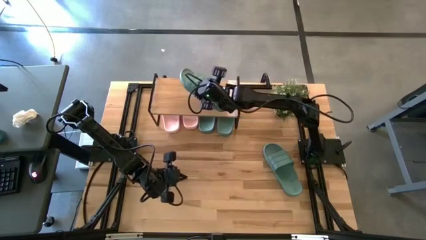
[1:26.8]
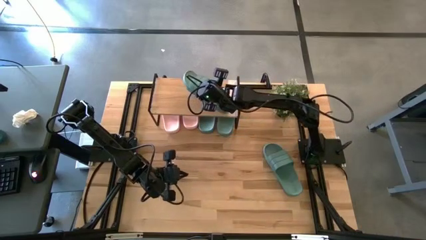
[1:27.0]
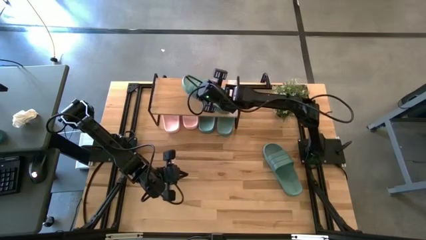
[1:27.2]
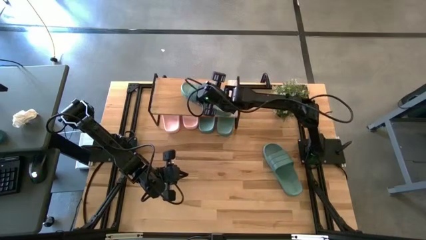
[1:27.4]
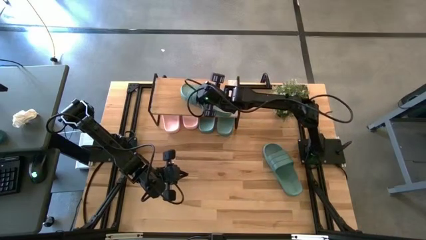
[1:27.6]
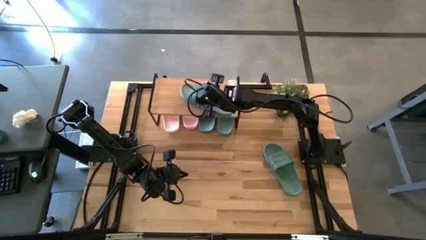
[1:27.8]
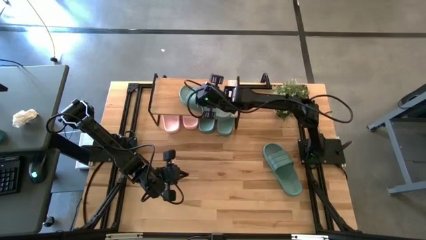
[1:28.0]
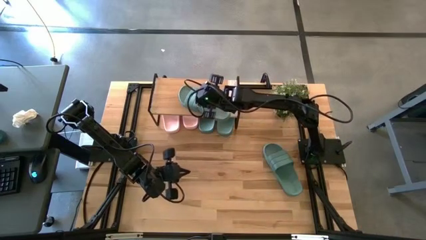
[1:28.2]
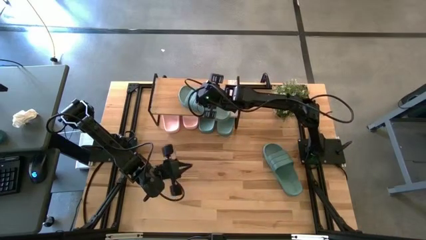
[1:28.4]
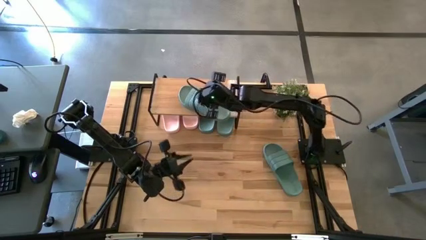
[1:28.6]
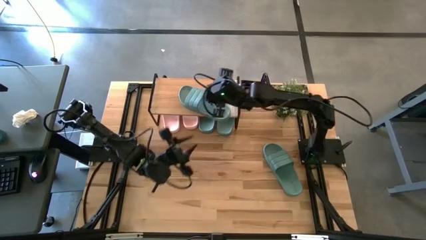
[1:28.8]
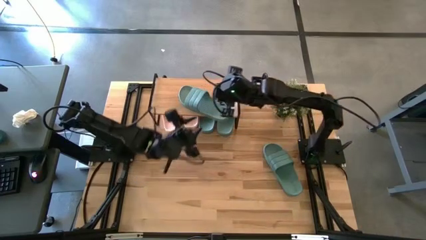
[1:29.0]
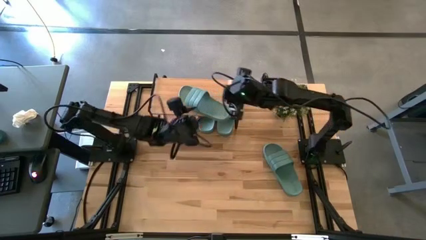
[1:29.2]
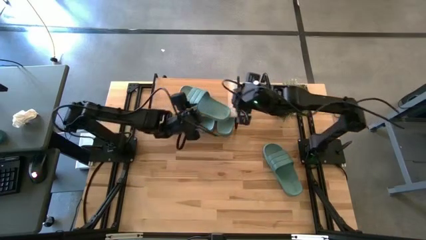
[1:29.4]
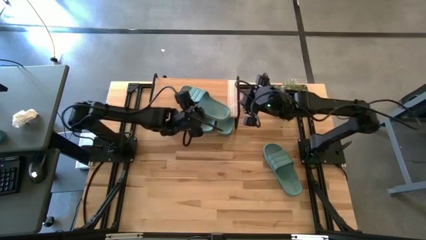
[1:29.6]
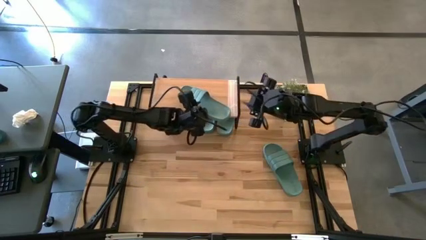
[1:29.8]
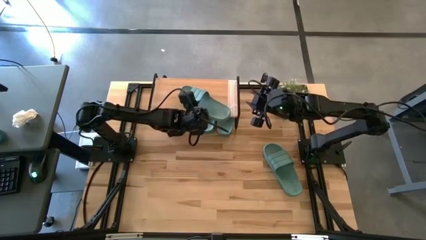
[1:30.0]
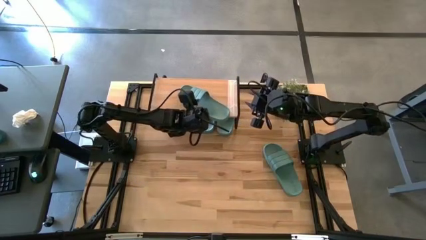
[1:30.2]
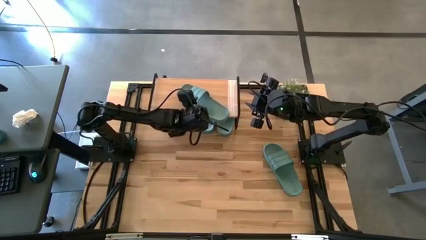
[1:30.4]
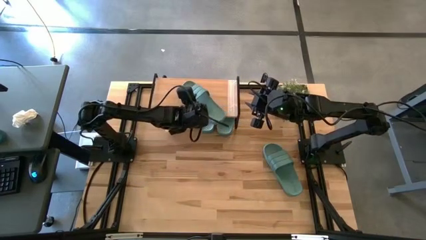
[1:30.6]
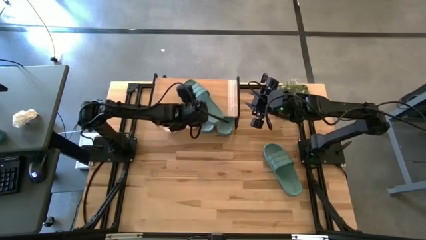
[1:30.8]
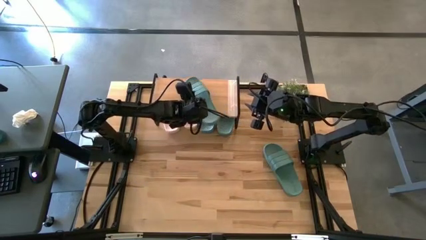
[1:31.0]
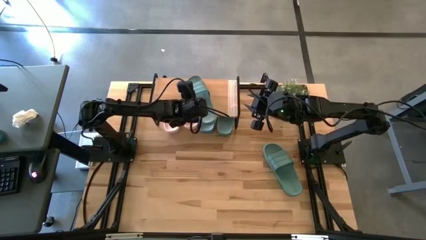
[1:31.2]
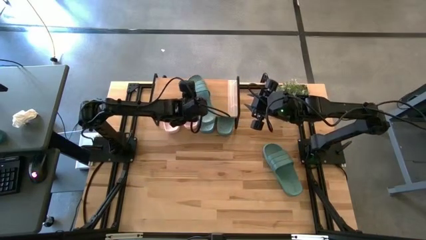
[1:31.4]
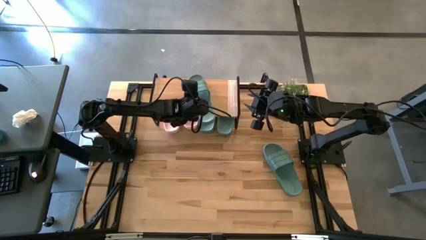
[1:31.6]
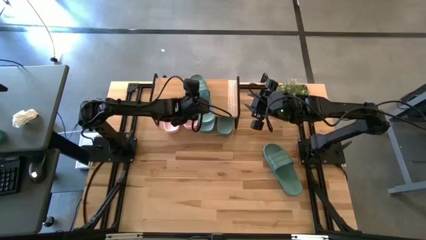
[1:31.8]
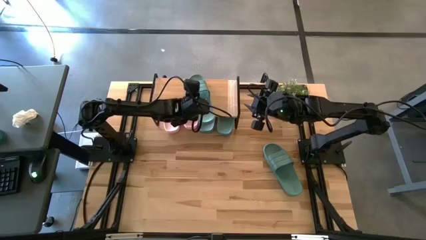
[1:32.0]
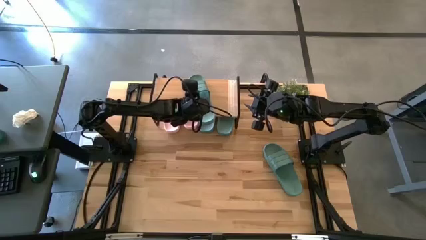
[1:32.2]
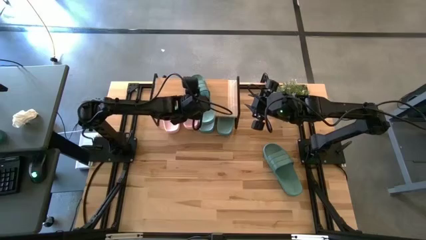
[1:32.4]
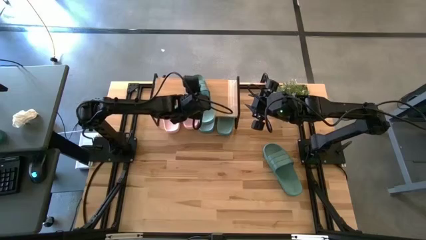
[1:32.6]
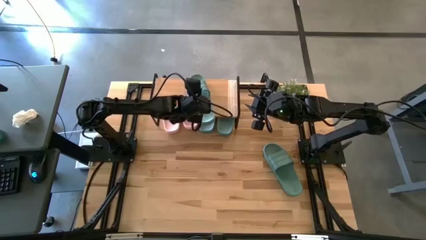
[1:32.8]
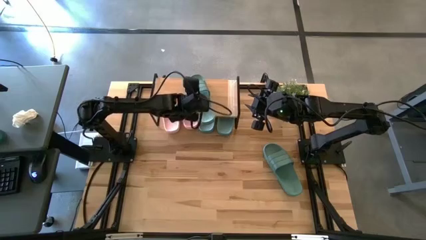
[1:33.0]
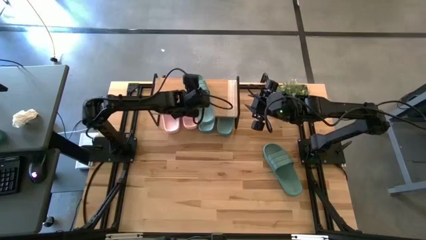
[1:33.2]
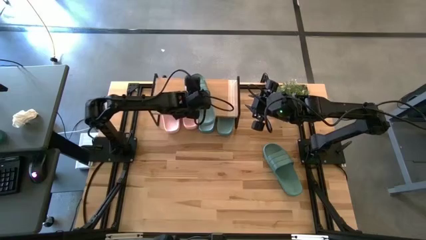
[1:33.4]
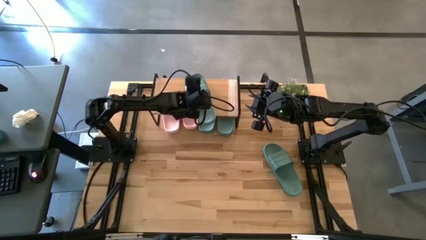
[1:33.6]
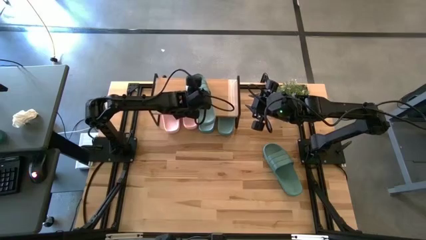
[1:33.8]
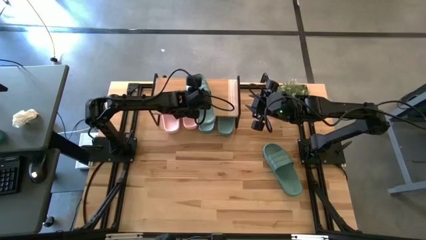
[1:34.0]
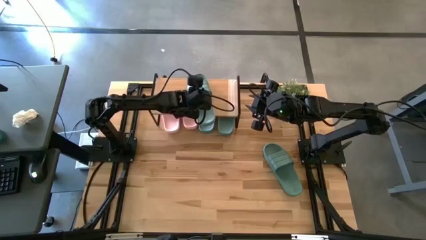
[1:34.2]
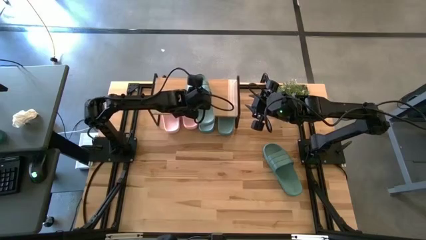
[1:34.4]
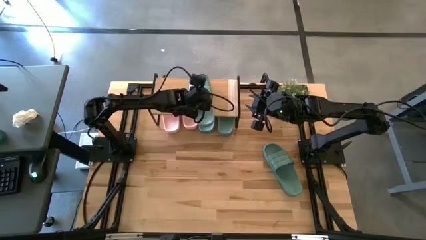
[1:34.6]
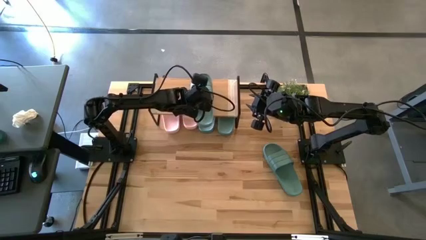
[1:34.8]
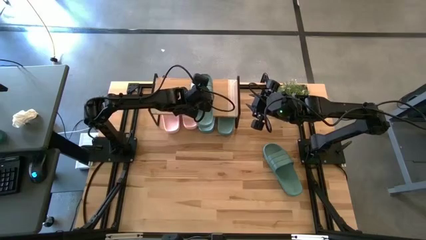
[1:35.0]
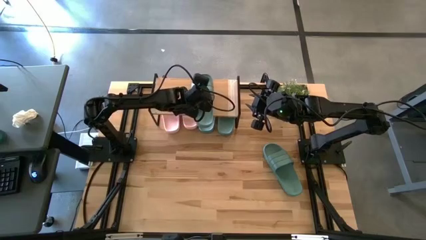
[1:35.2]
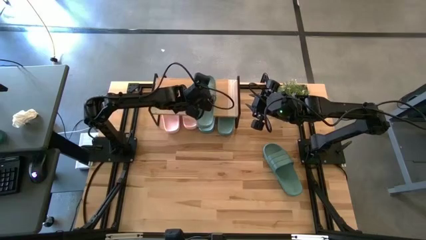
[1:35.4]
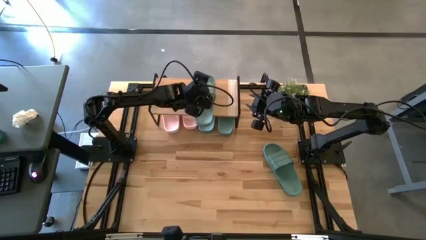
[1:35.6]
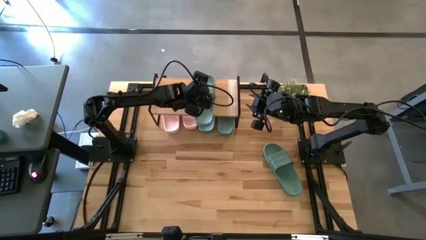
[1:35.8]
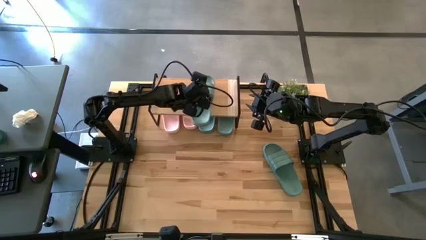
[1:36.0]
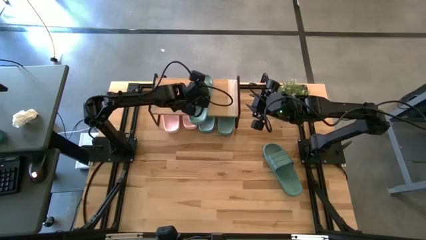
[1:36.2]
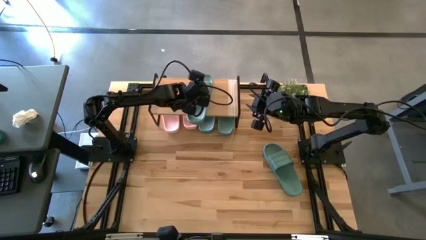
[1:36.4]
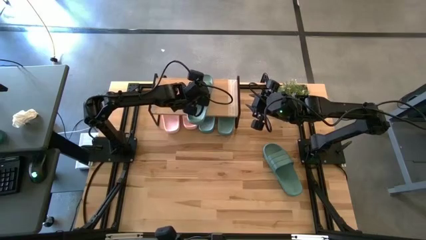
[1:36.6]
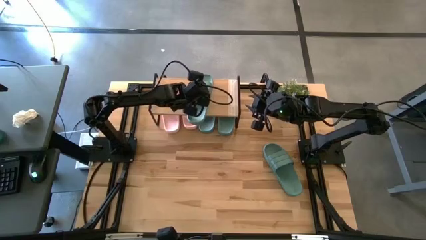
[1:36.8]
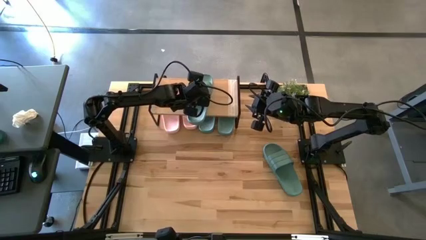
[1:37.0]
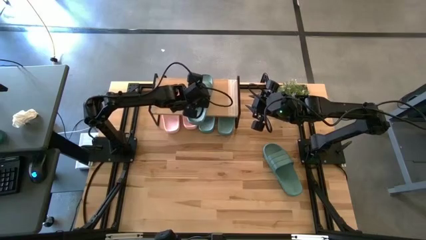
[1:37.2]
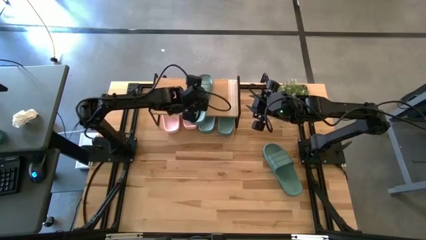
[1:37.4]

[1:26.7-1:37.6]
Task: Pick and place slides into the shelf
Put the left green slipper on the top shelf

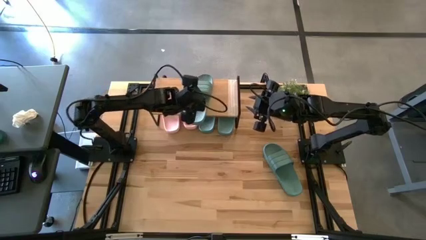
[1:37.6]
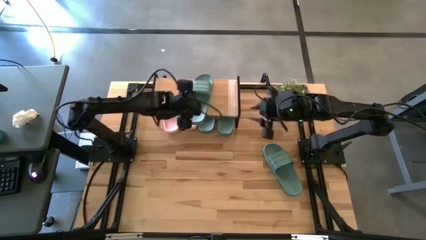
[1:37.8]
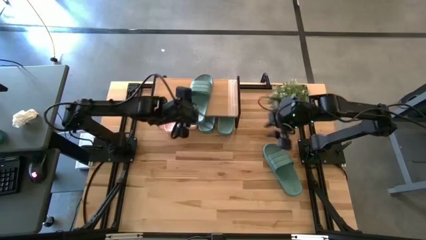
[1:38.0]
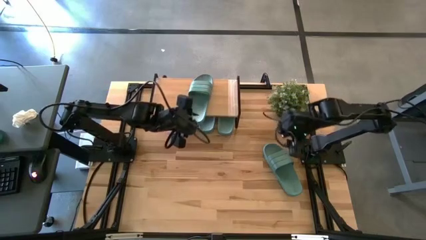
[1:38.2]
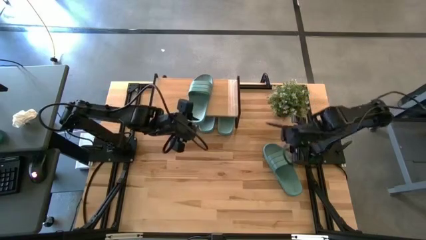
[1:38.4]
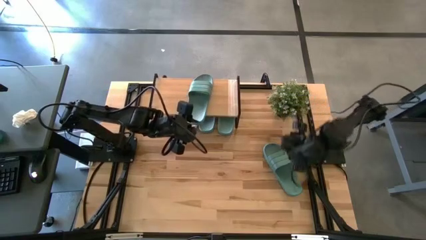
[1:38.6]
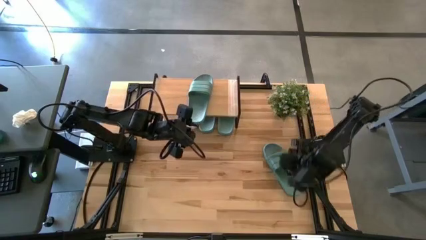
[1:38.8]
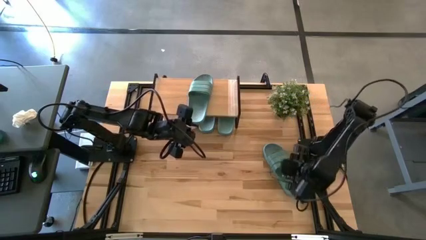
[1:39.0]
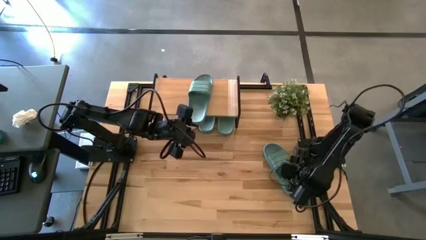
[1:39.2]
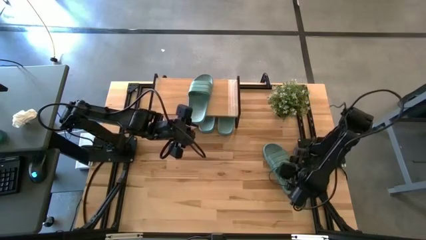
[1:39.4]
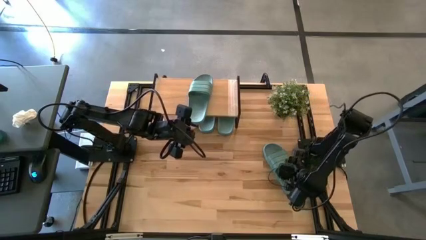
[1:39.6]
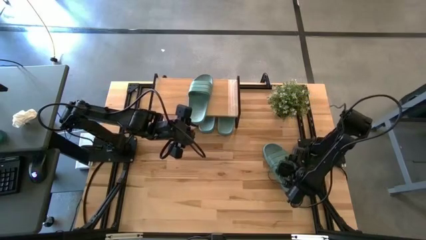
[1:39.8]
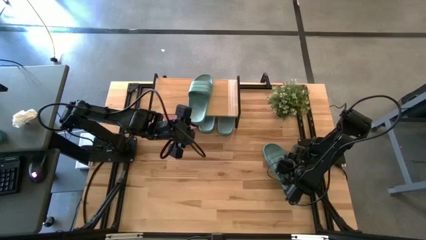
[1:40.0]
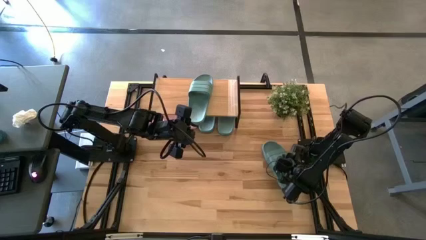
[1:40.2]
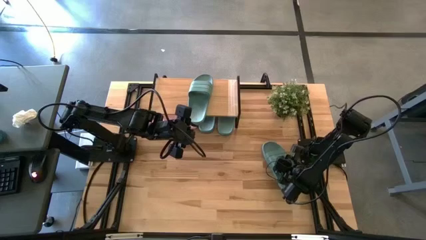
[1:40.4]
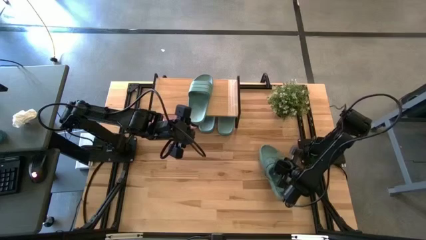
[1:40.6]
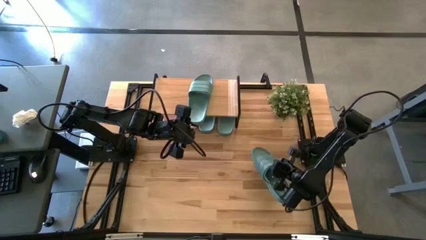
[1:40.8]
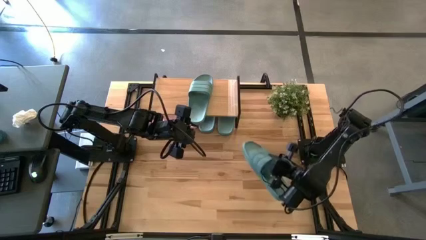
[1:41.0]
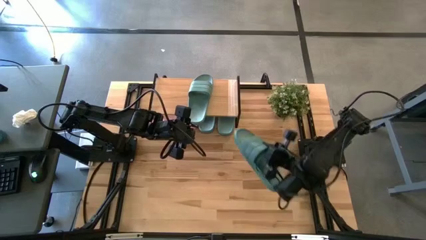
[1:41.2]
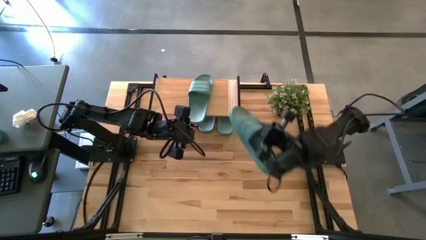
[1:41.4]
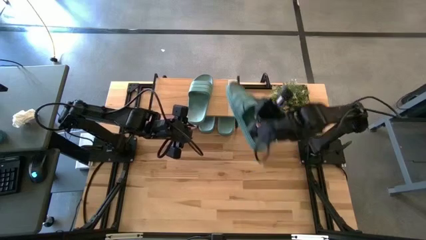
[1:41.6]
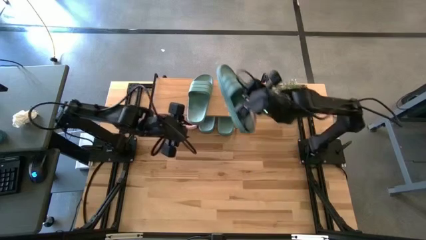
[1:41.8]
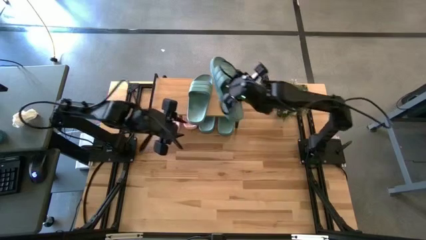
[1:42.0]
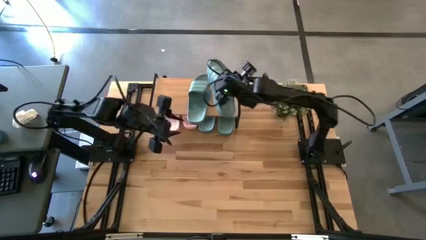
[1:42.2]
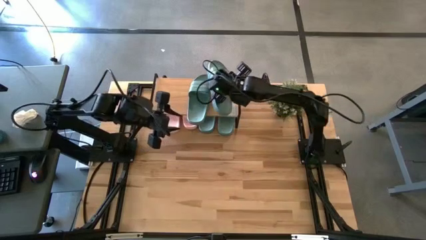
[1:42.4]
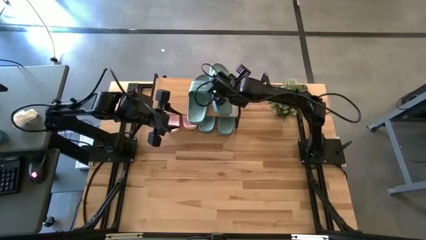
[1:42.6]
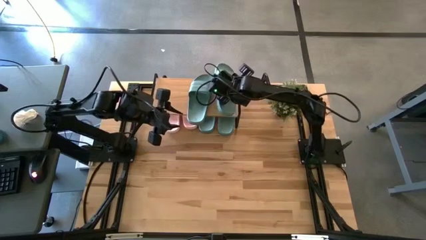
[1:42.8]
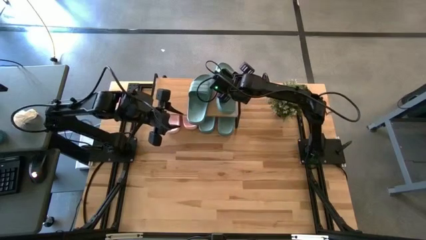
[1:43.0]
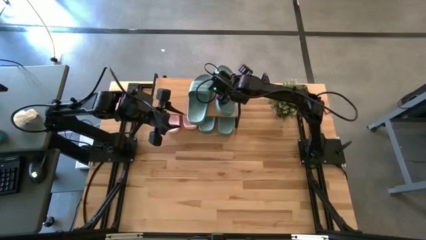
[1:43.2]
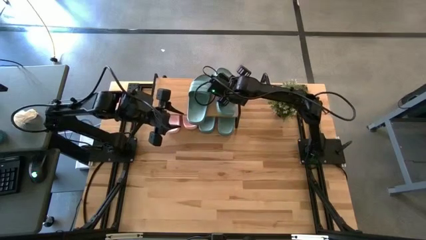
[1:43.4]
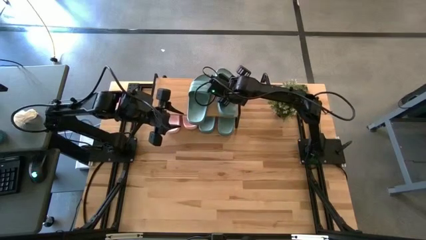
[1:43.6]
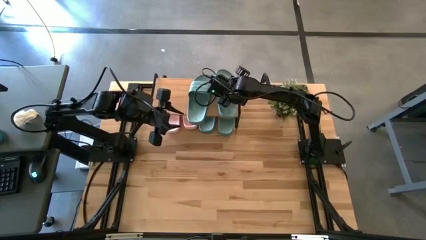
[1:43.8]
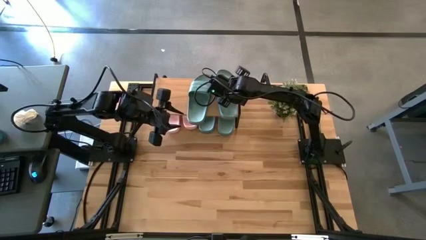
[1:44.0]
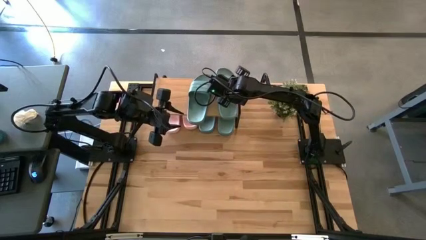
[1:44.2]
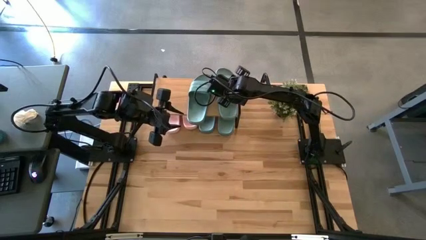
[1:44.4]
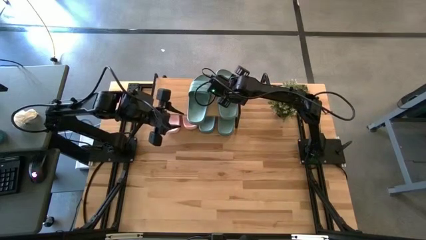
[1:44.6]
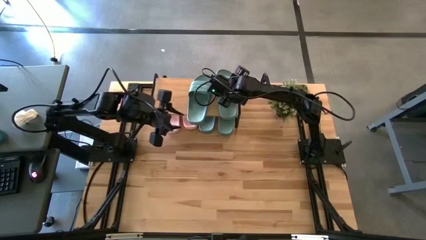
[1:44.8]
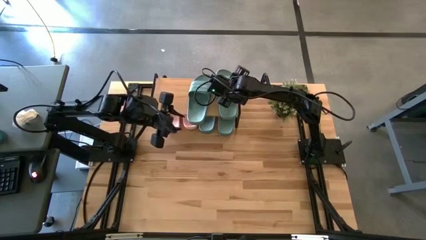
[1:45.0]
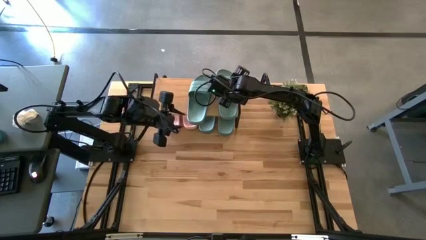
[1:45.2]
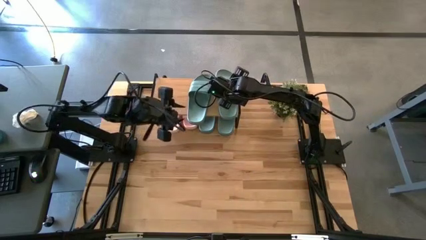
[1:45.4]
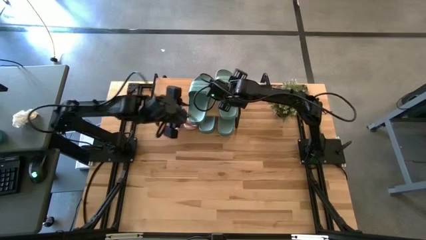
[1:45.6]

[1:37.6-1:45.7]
Put the right green slipper on the top shelf
